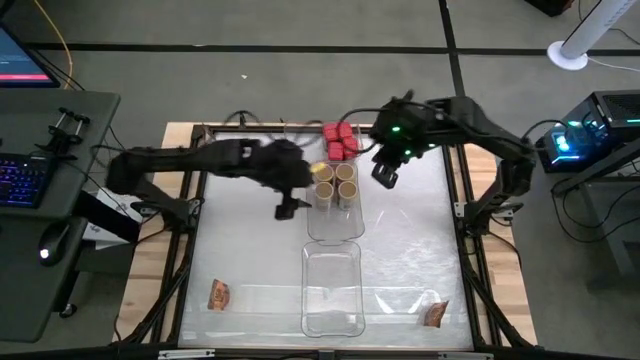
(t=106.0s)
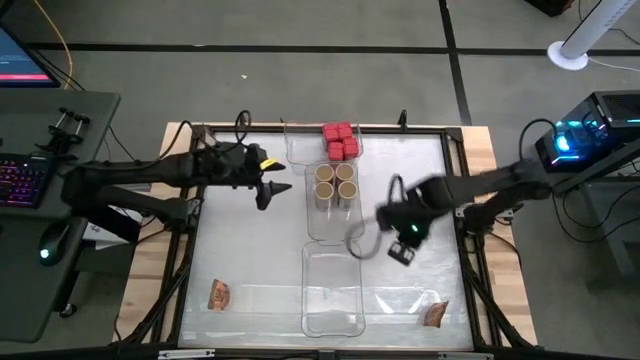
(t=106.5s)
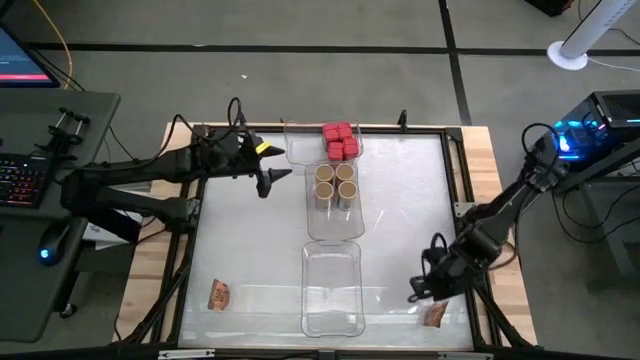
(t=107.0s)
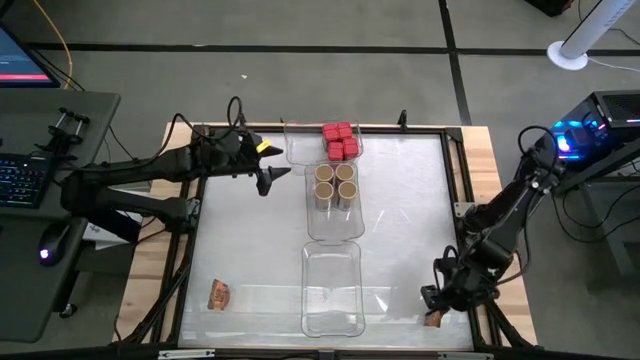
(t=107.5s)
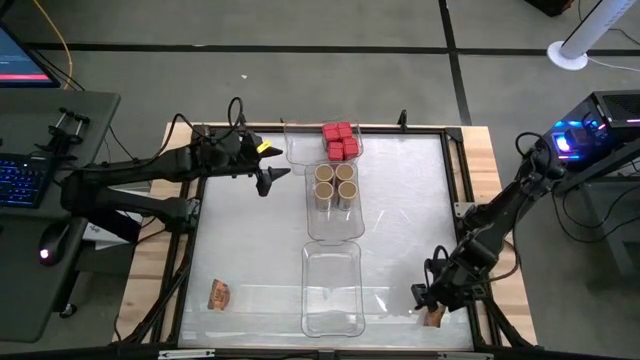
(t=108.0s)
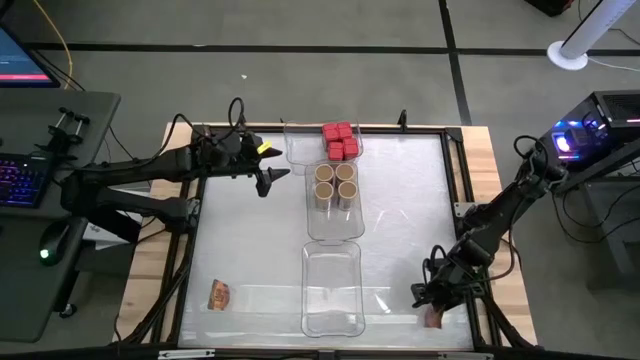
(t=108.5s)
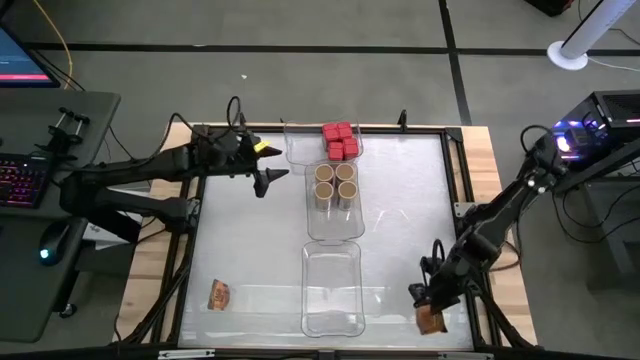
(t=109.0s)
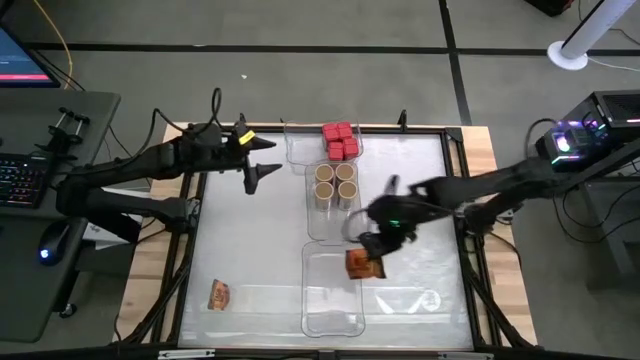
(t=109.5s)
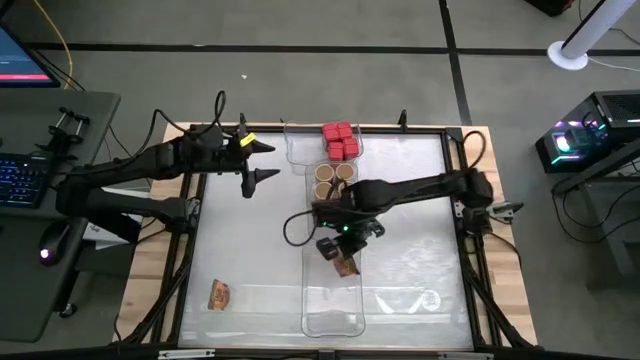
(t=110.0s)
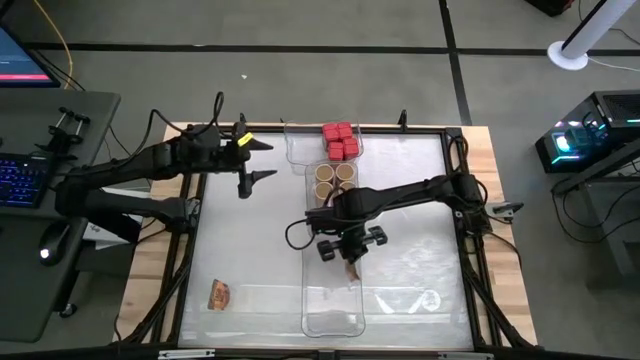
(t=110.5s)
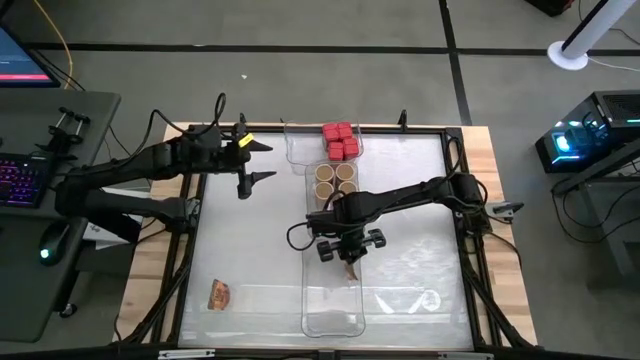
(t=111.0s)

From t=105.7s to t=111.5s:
Task: Sort spices by type
Put the bottom right orange seasoning pack into the bottom transparent bin

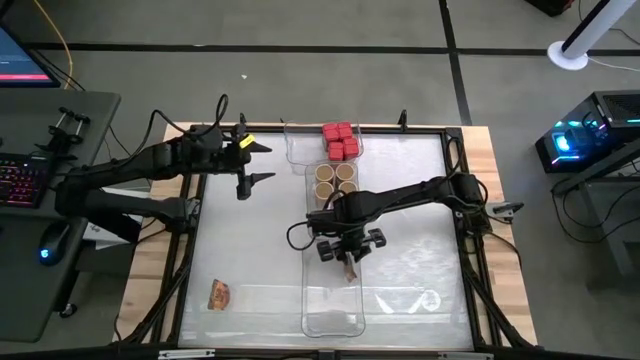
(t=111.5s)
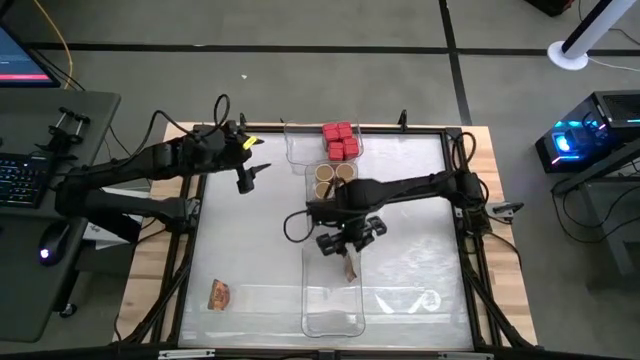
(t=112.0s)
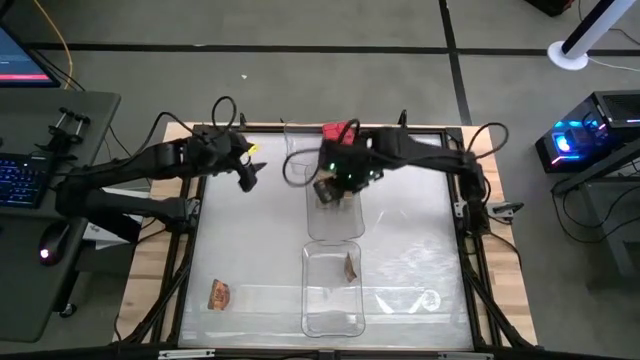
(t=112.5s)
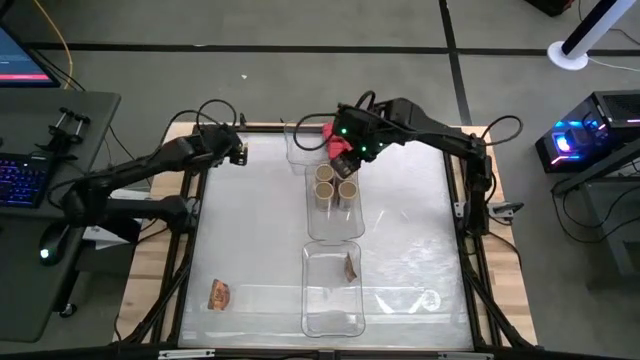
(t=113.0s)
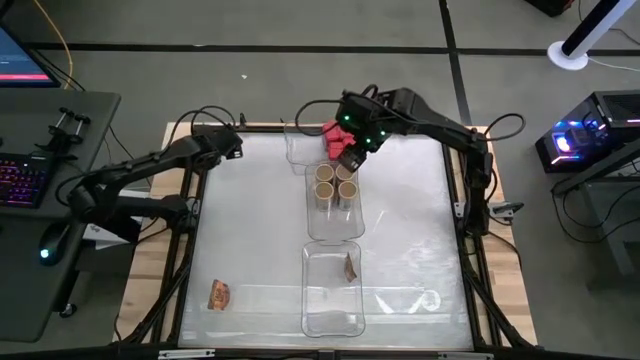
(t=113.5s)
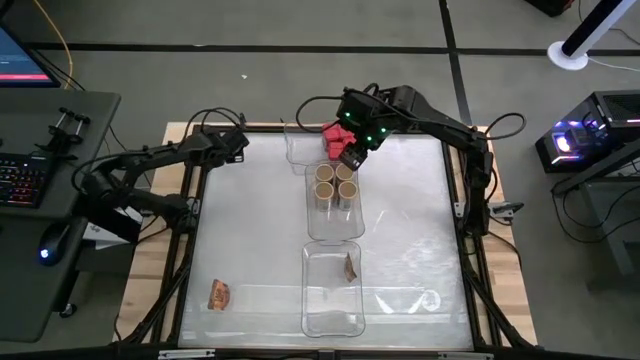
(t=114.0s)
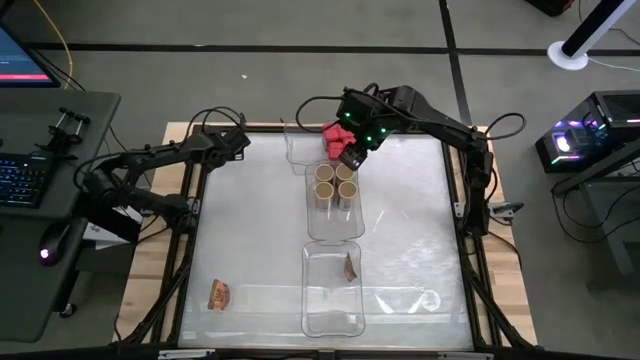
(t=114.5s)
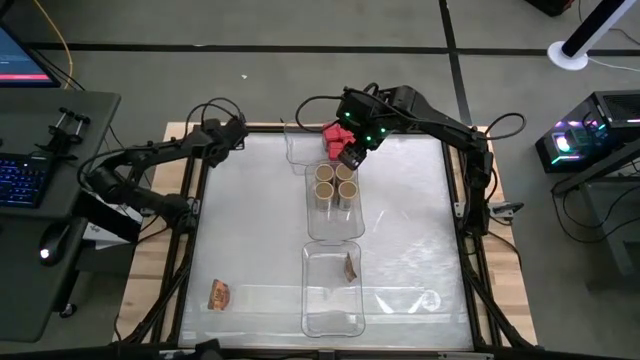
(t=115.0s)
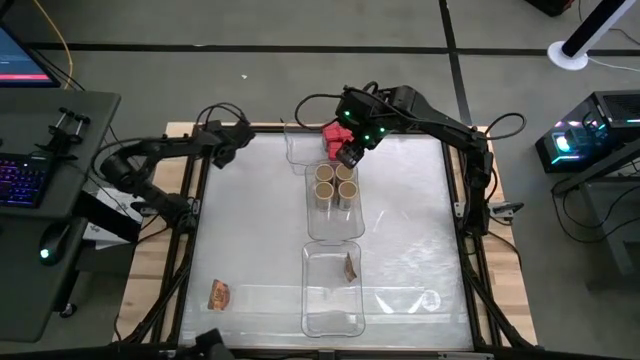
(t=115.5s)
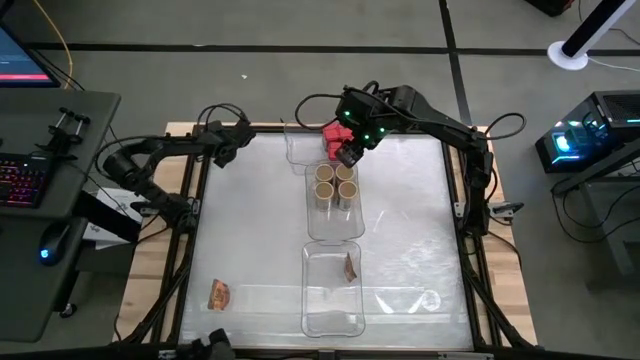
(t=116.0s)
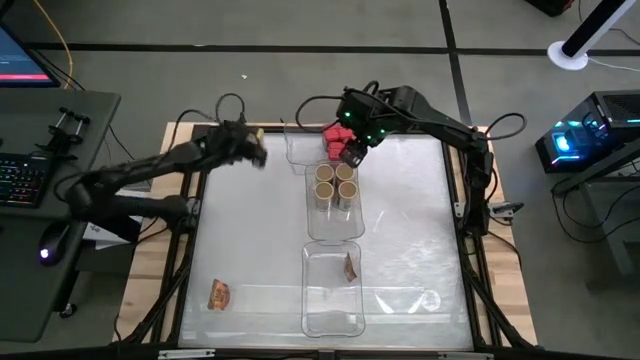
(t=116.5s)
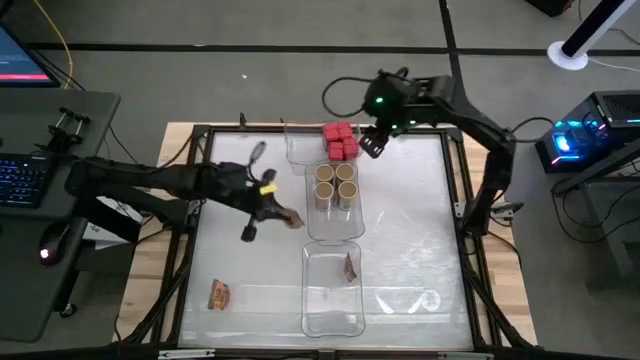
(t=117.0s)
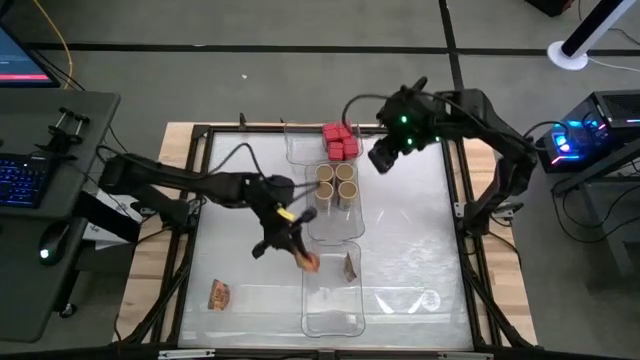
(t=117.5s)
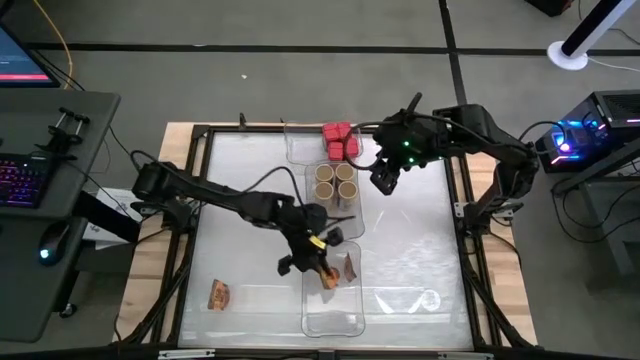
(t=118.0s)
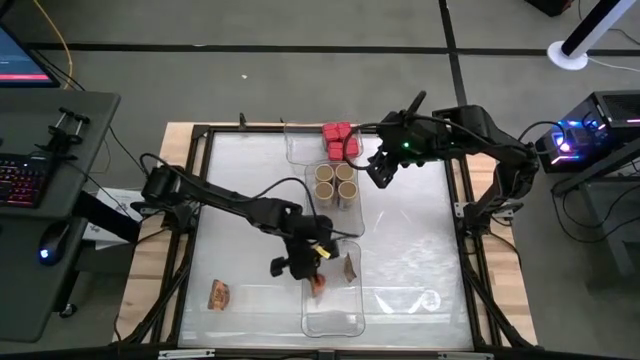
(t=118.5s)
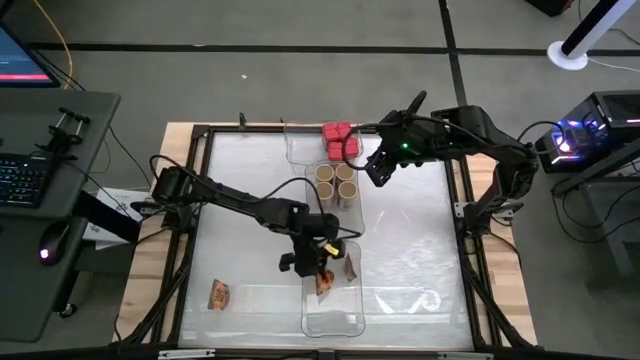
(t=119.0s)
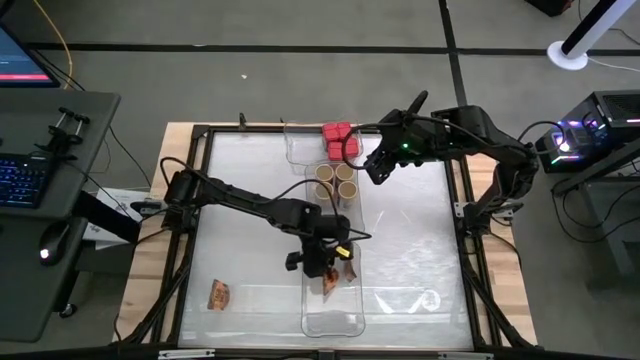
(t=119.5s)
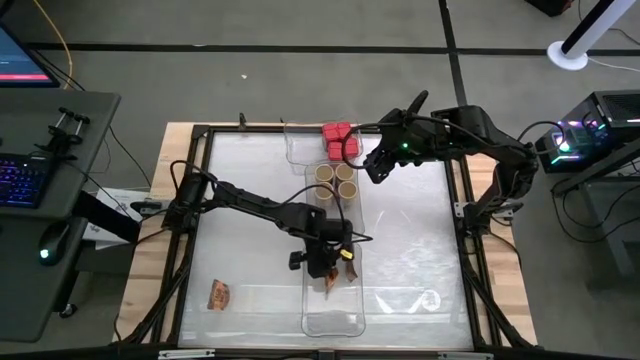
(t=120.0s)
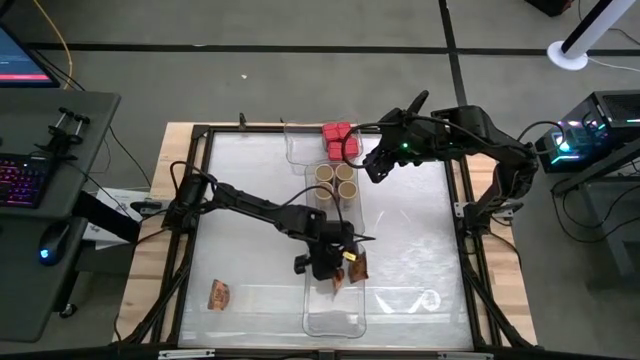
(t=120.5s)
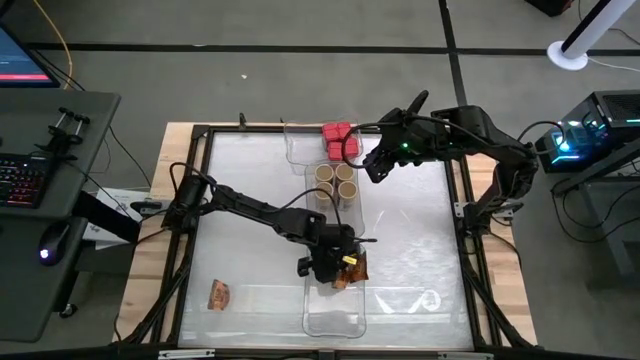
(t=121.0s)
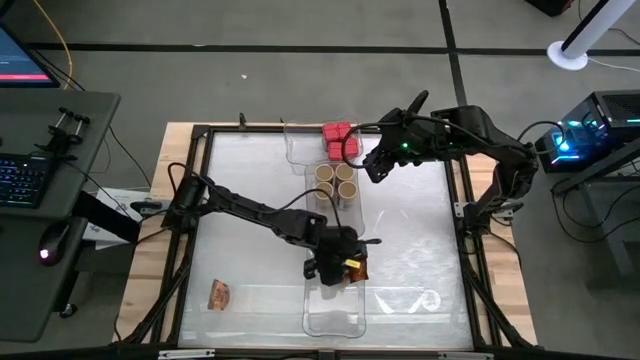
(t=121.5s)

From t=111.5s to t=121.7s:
Put the top orange seasoning pack into the bottom transparent bin

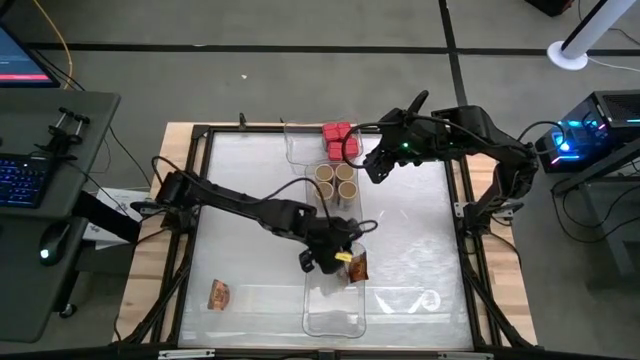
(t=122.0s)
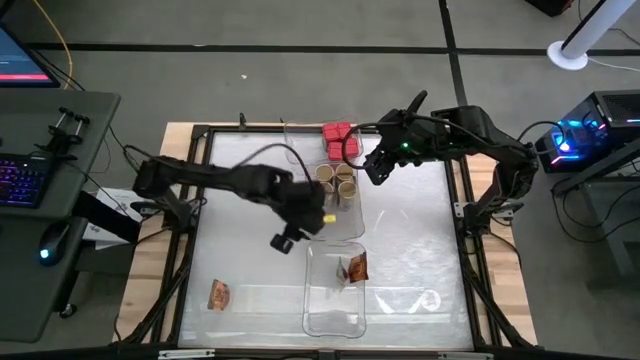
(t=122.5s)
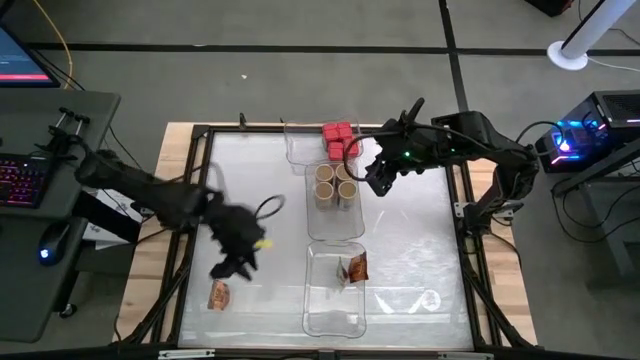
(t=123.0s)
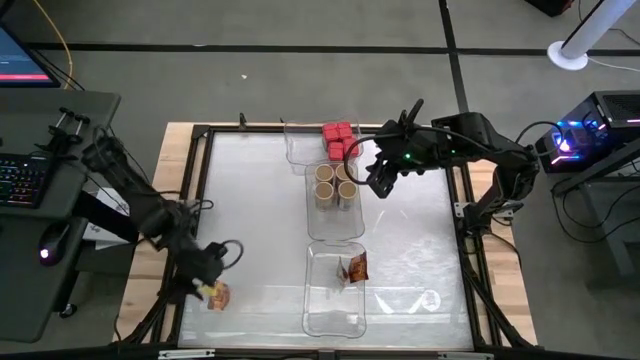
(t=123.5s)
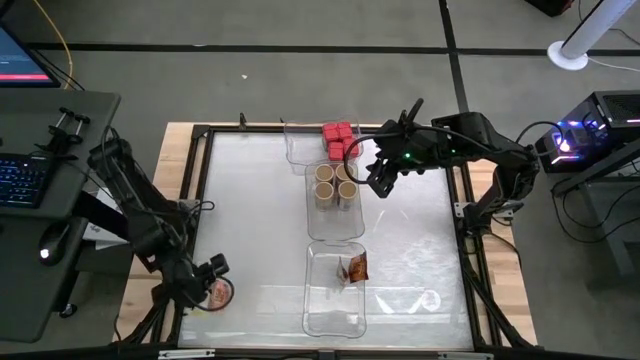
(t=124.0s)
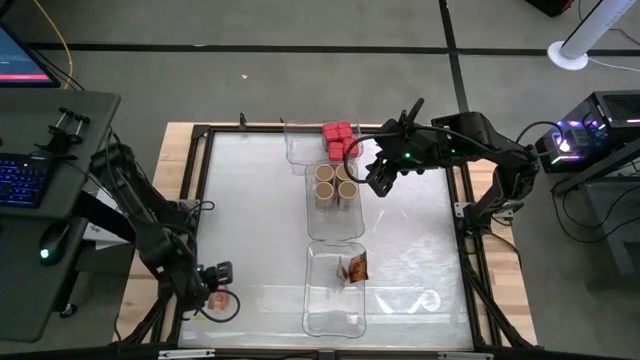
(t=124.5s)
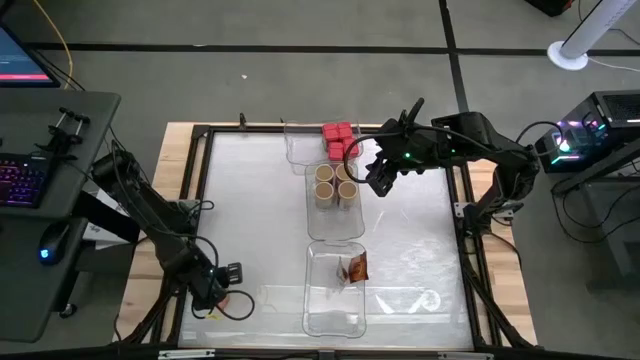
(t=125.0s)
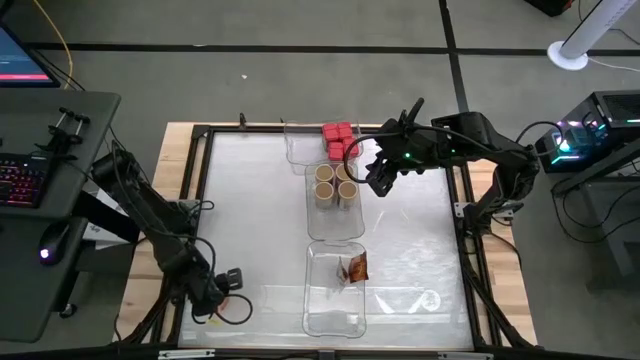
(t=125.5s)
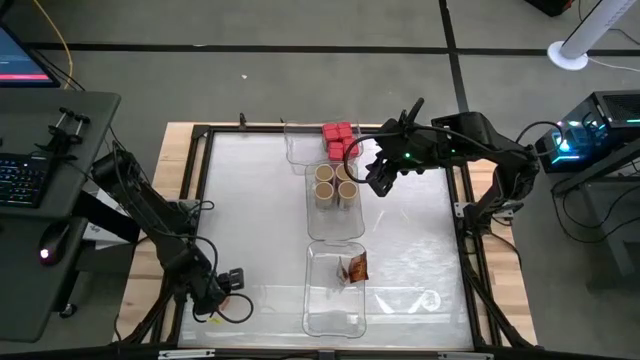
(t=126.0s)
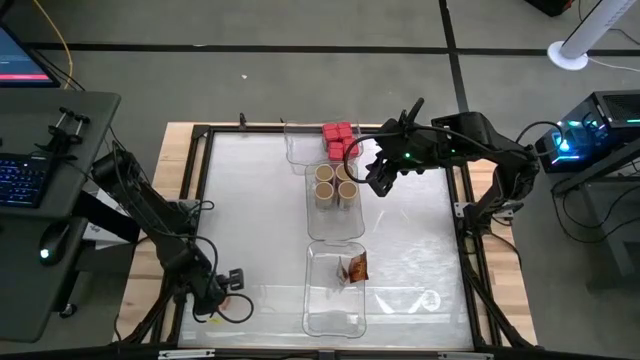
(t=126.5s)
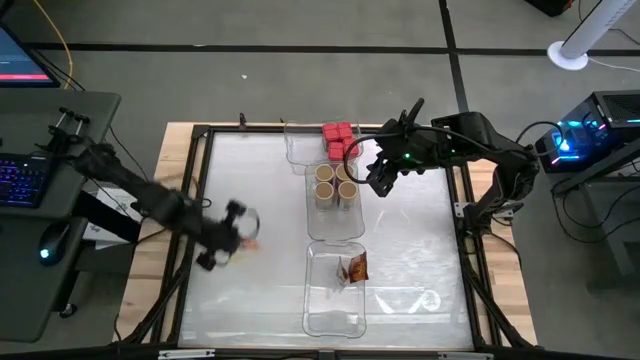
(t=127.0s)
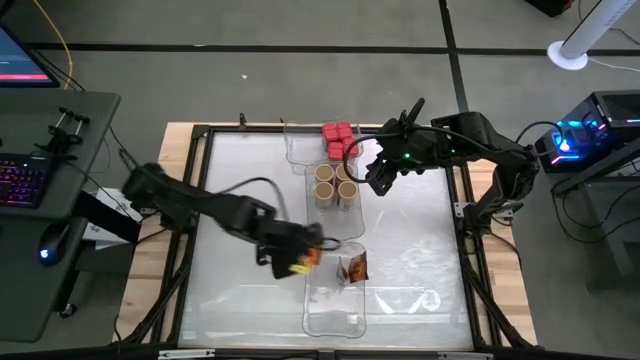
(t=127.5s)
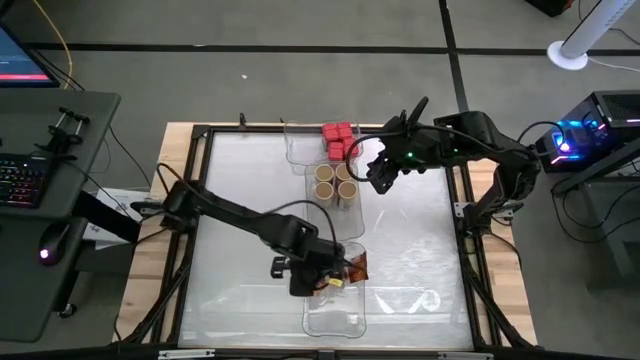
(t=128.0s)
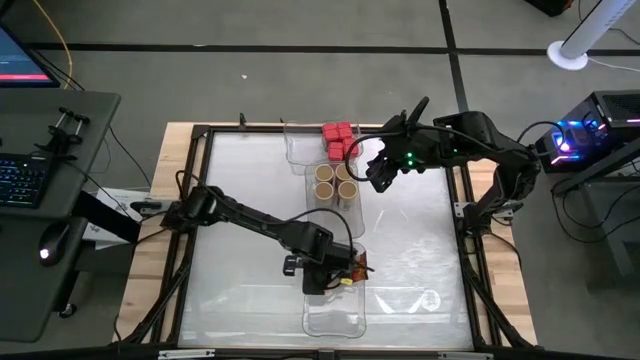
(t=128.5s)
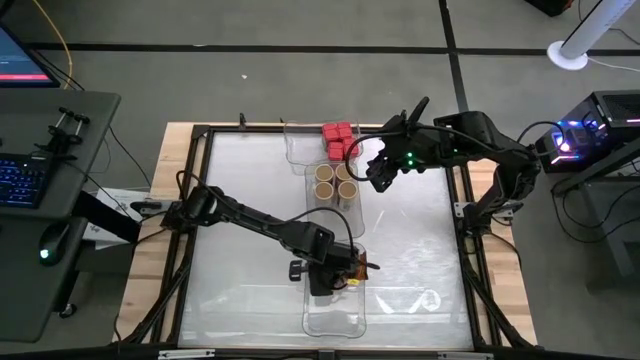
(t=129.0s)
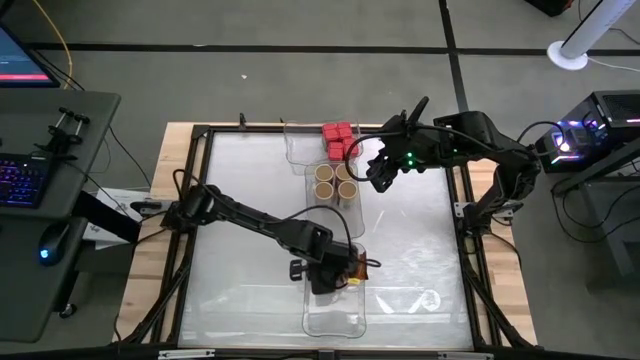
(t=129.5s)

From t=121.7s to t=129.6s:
Put the orange seasoning pack into the bottom transparent bin
